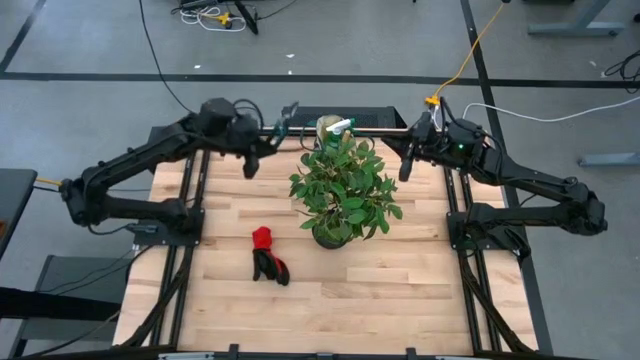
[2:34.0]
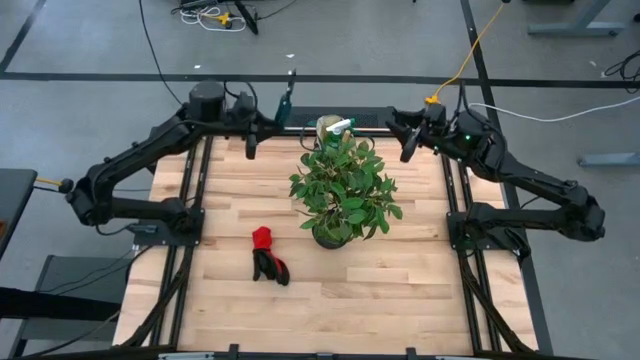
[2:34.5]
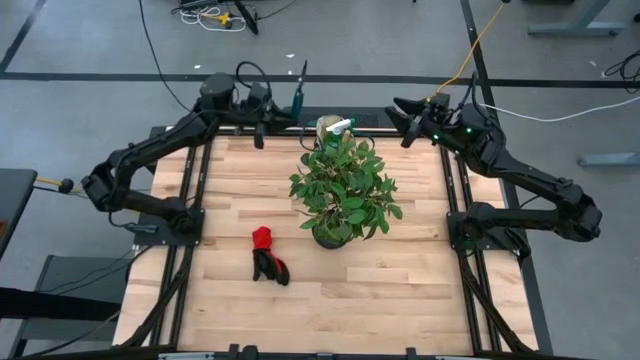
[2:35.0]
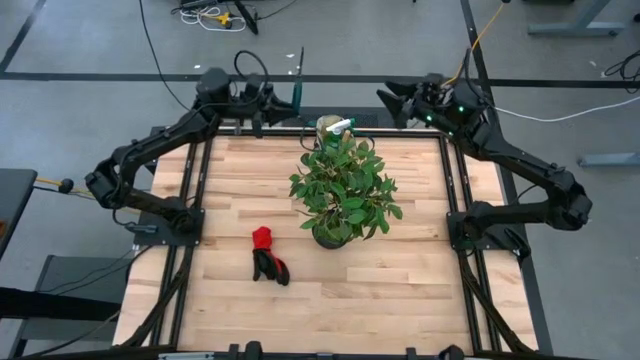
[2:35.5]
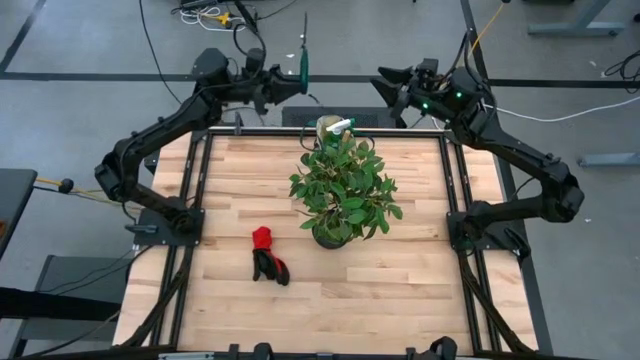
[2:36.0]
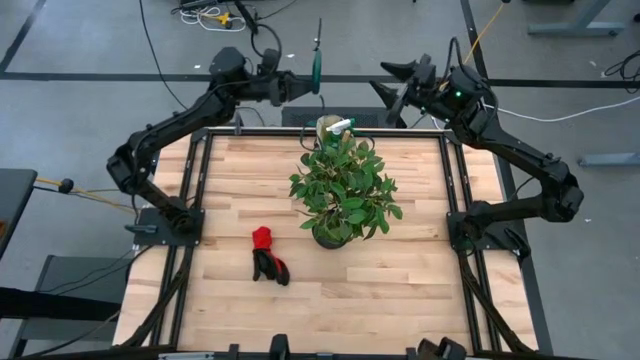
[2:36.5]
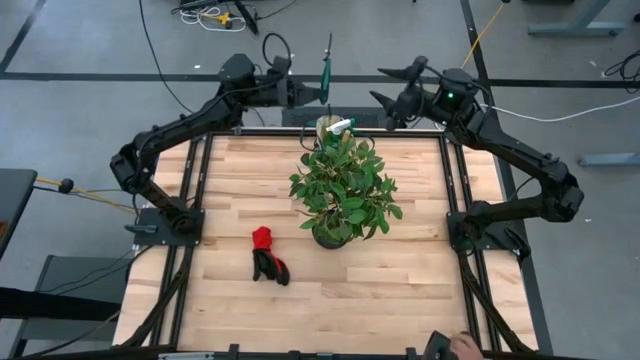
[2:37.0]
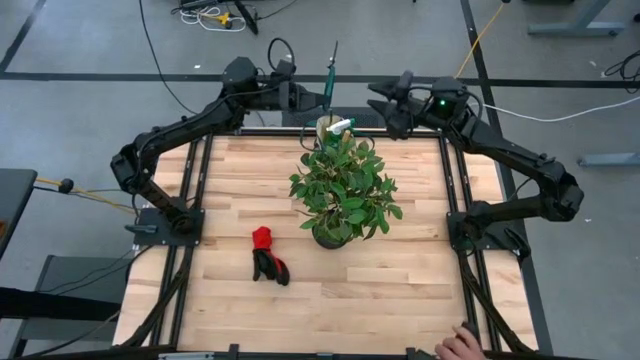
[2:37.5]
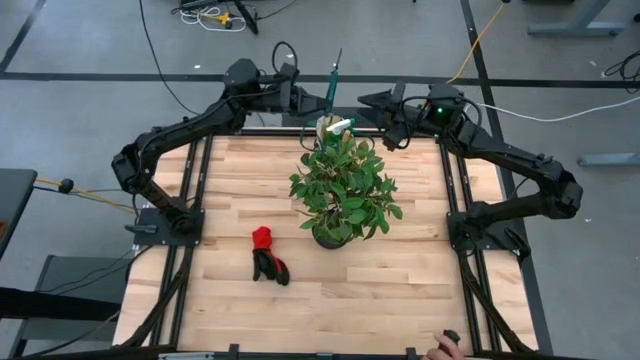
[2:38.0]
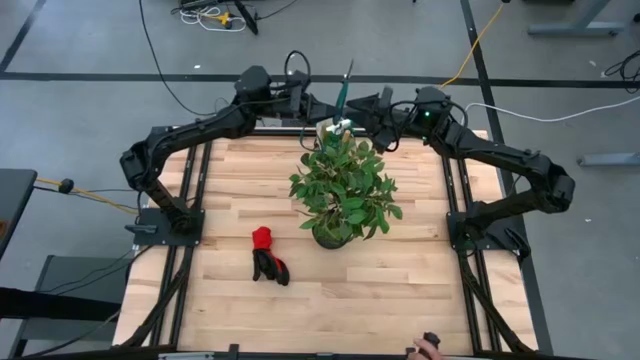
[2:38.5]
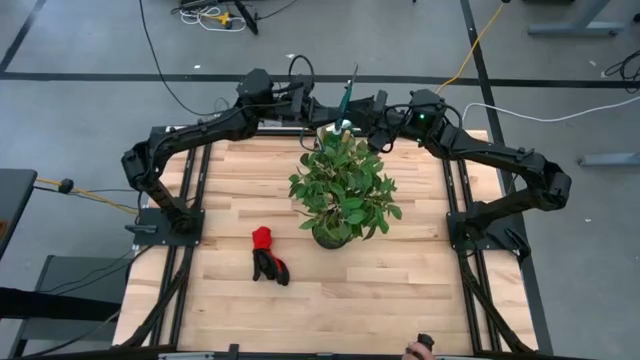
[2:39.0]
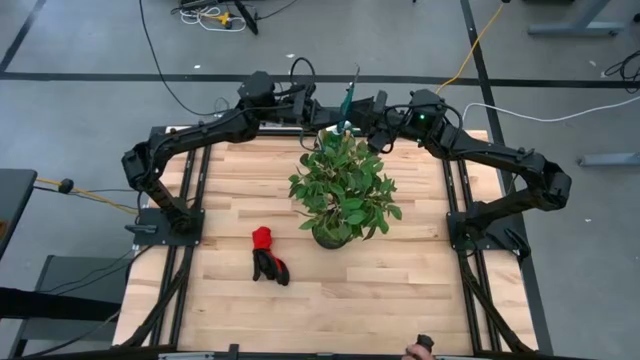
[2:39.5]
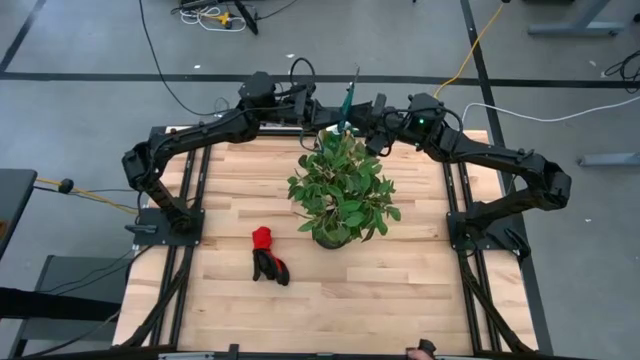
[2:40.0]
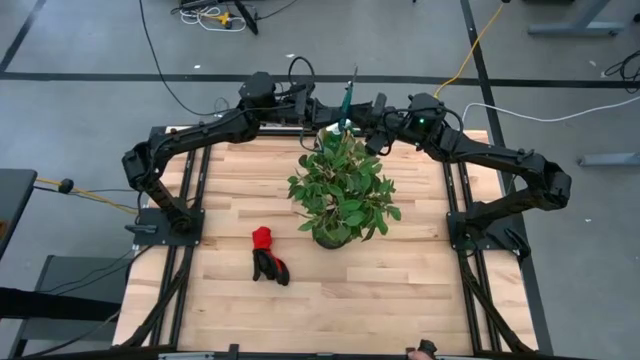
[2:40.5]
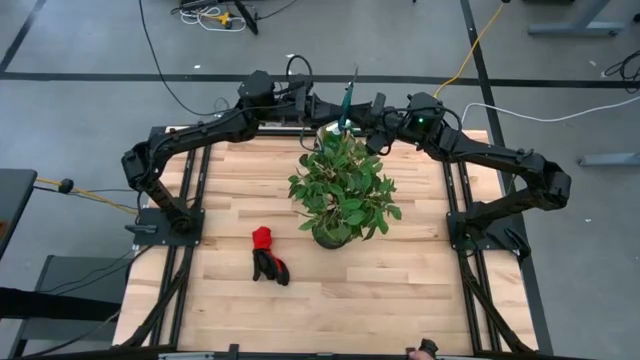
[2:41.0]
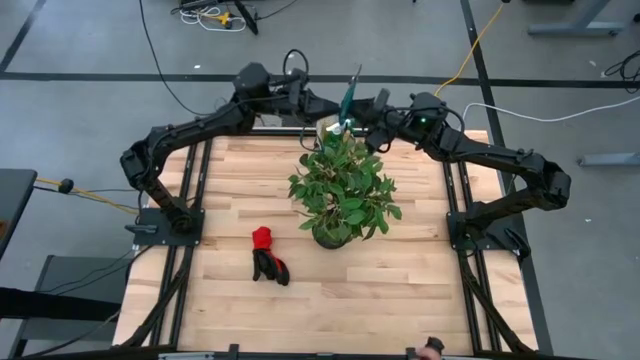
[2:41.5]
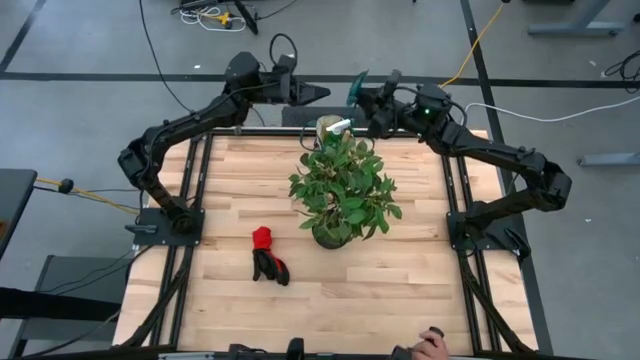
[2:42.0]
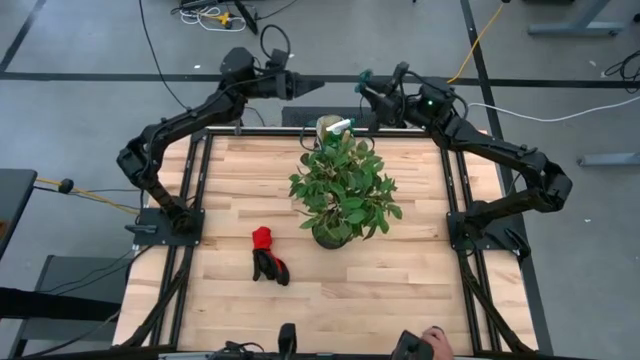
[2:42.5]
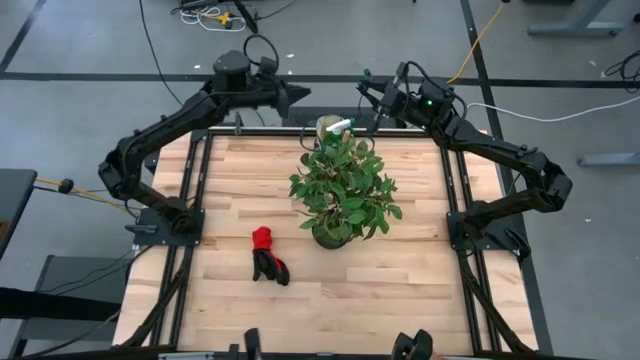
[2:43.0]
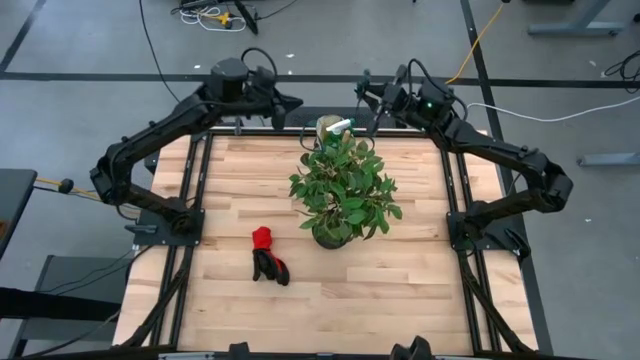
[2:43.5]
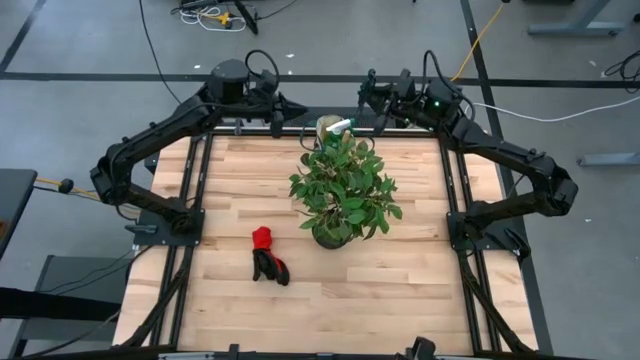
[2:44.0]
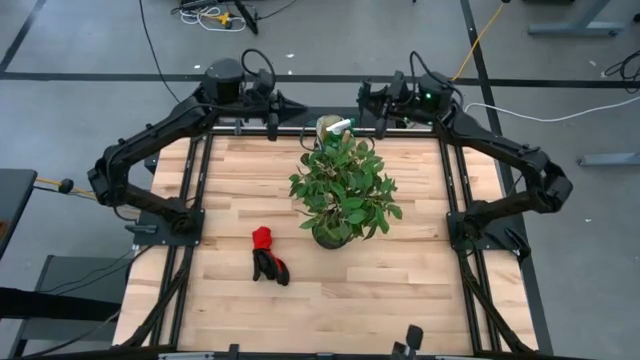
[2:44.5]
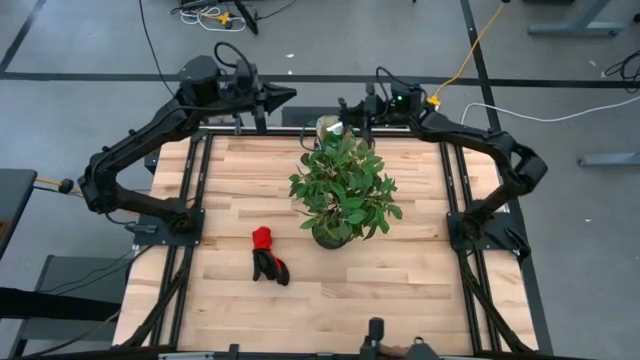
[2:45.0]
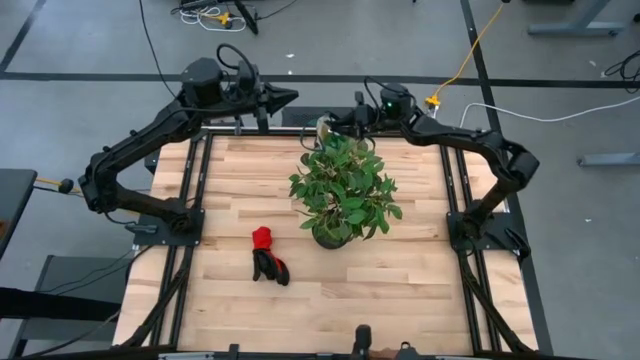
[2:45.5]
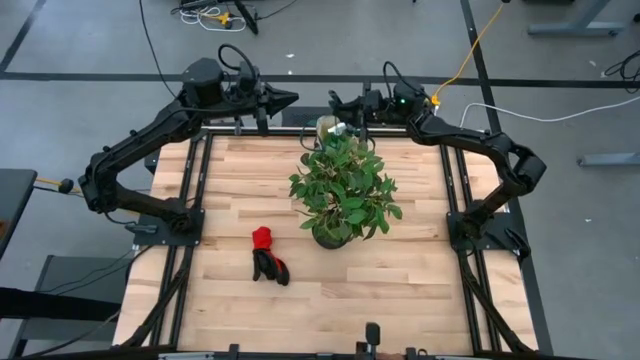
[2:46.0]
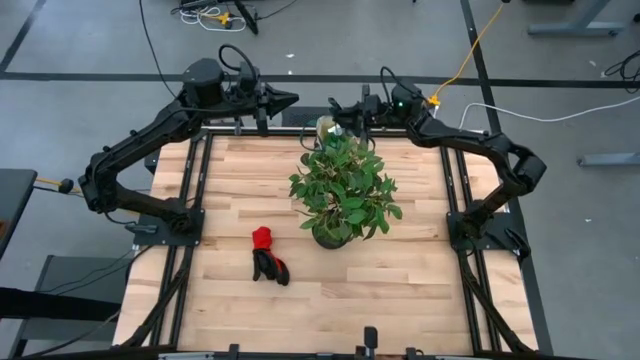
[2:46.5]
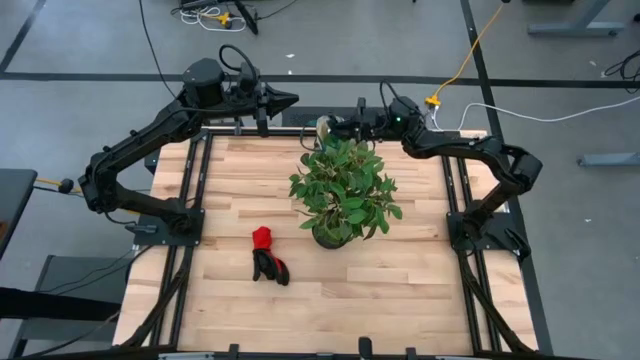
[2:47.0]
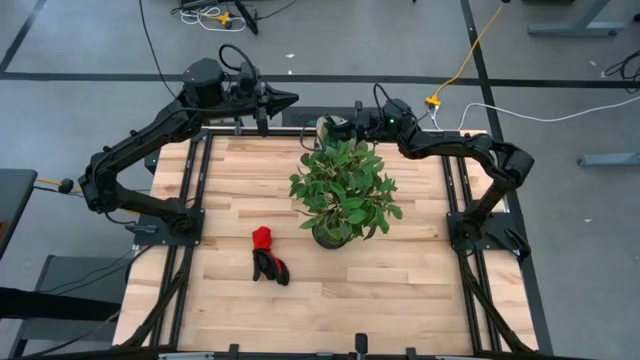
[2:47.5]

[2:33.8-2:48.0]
Task: Pick & Place Garden tools in Gardening bag
Put the green shear scissor into the gardening bag

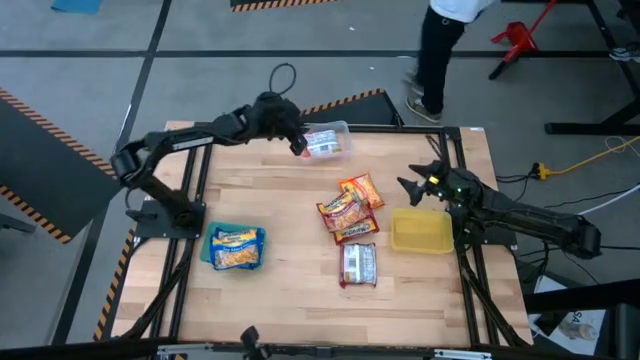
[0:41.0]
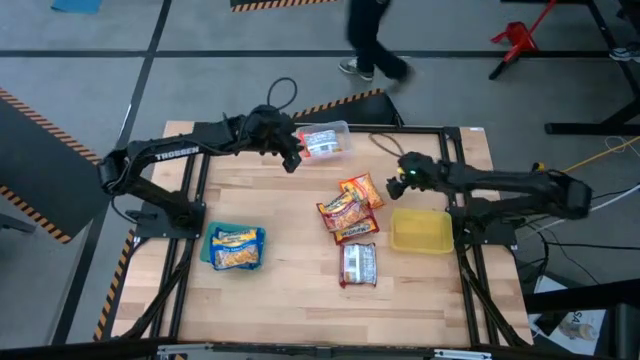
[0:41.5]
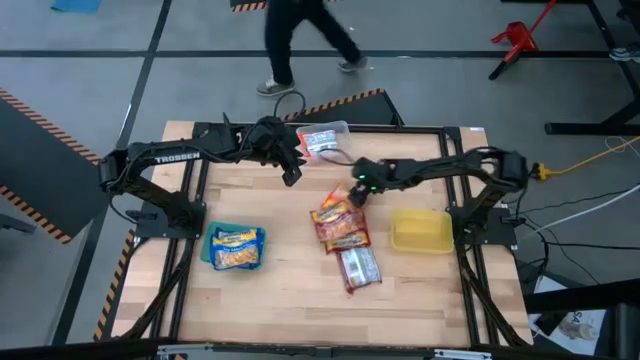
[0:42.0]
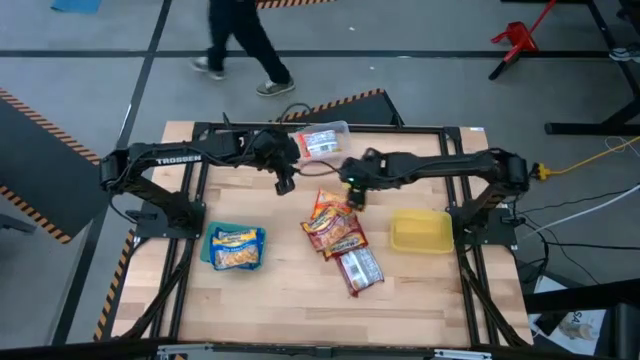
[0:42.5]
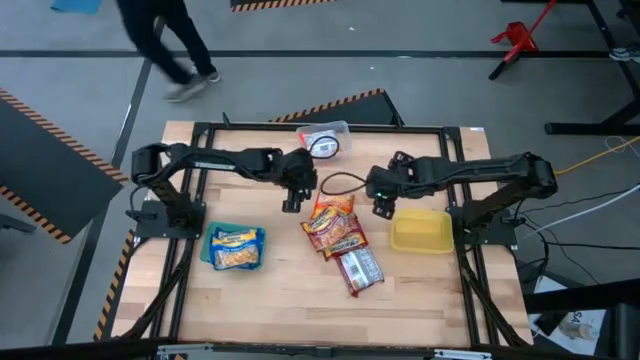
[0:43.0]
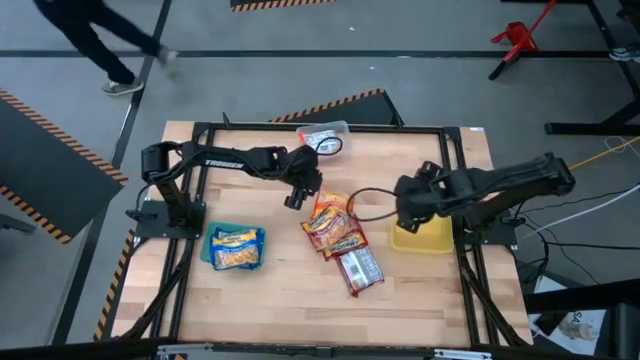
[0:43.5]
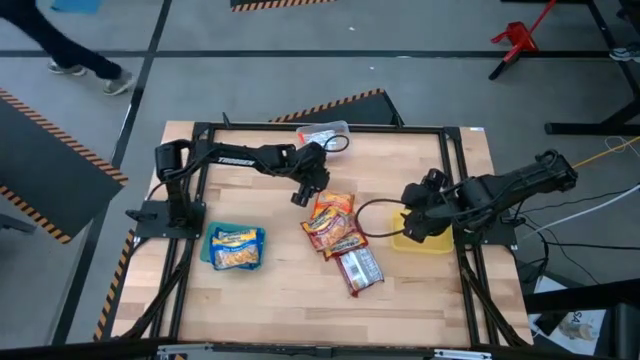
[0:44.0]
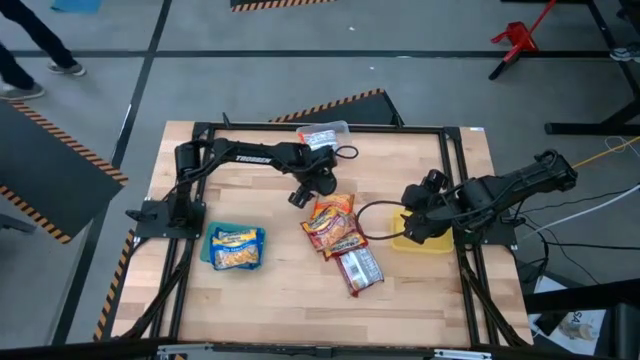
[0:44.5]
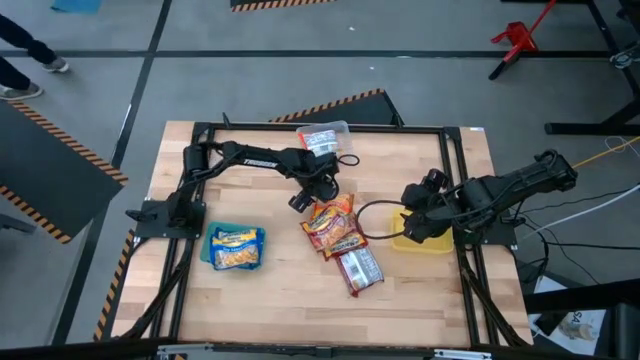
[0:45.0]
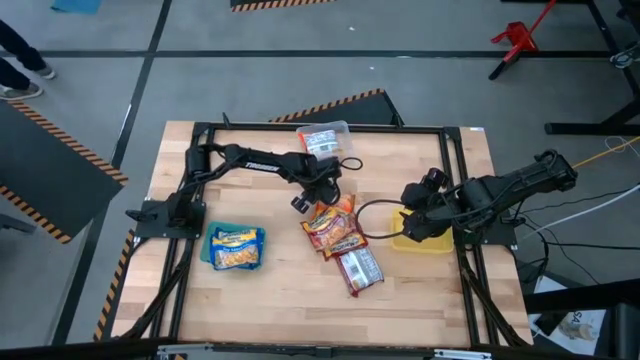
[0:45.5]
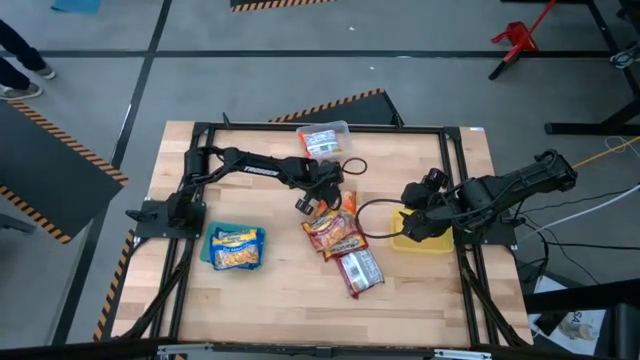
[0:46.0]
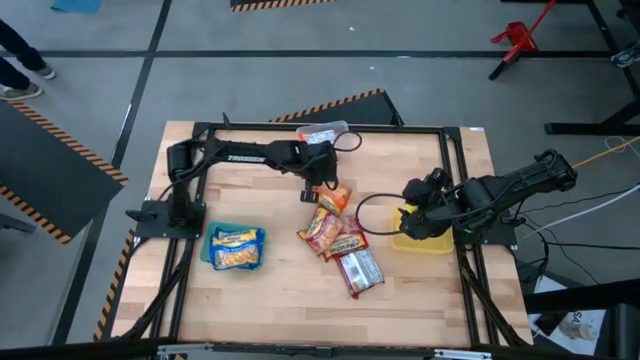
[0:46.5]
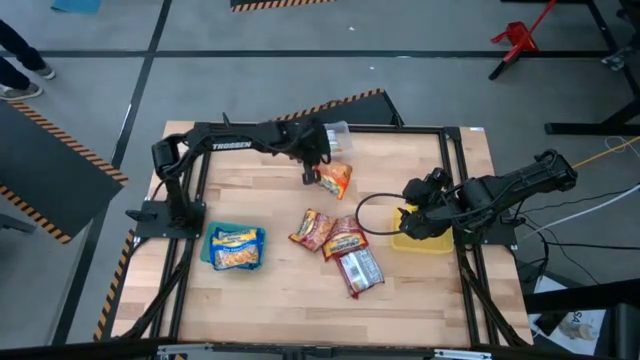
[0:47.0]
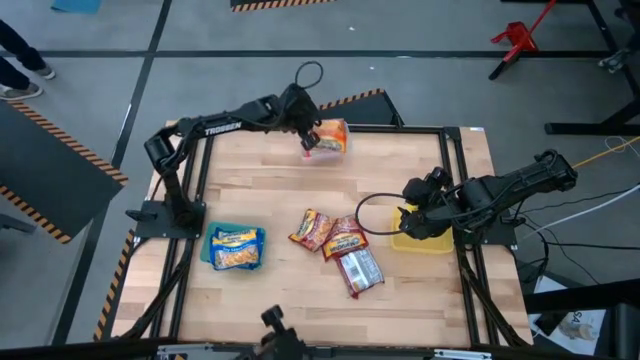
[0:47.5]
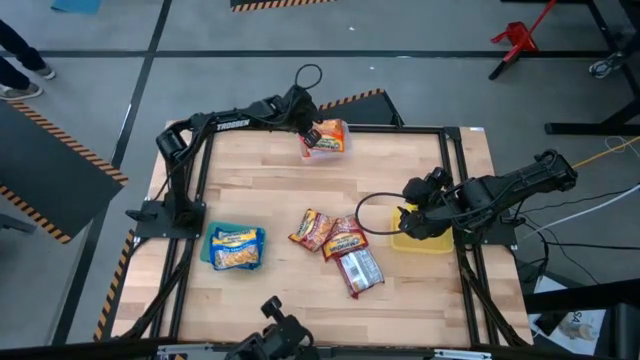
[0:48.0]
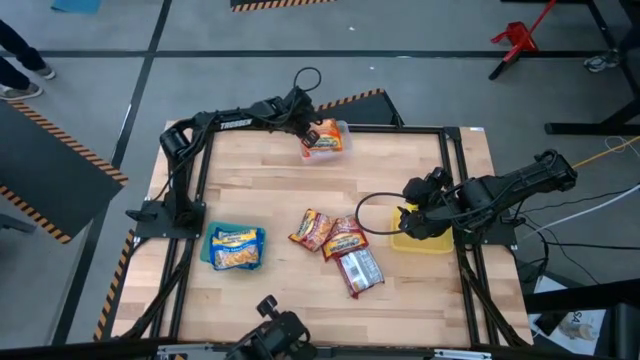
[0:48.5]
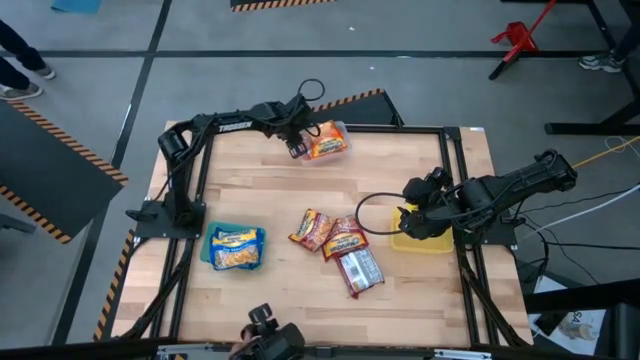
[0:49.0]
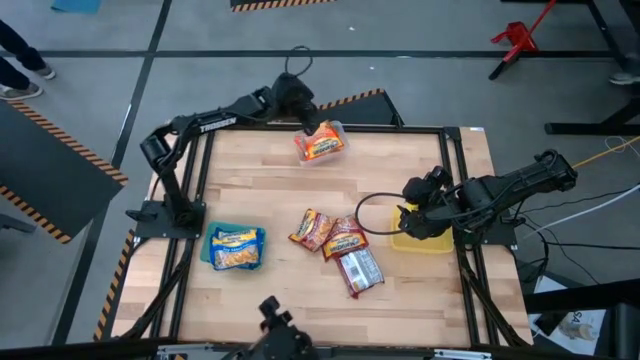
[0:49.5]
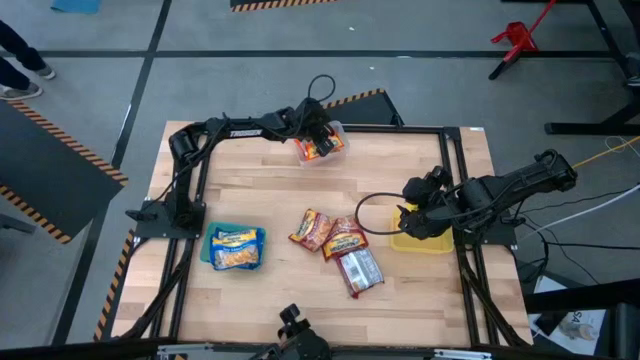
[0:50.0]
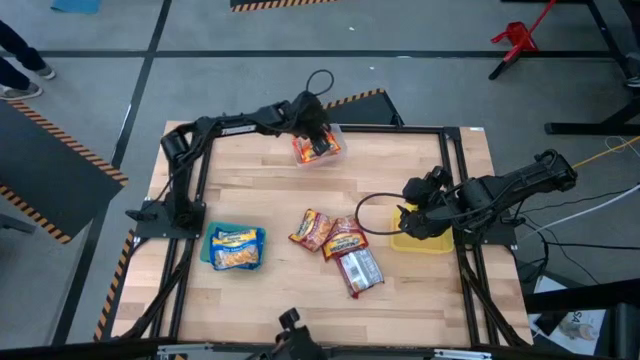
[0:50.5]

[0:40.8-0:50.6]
Task: Sort Maruchan noodles
Put the orange noodle pack into the transparent bin
